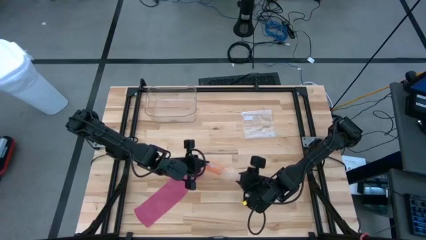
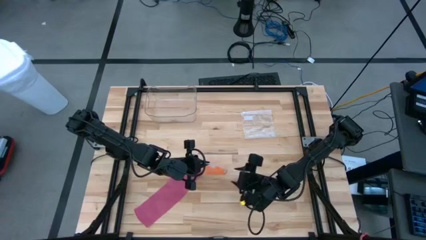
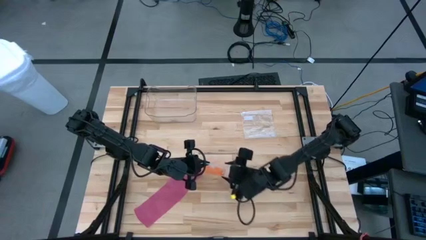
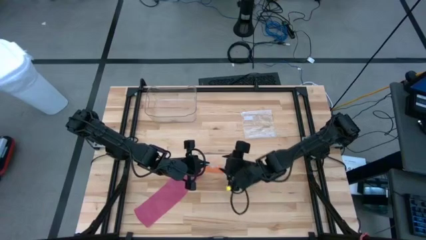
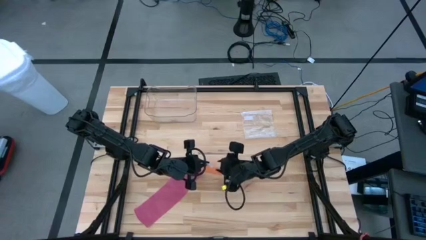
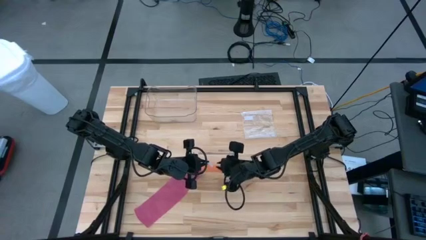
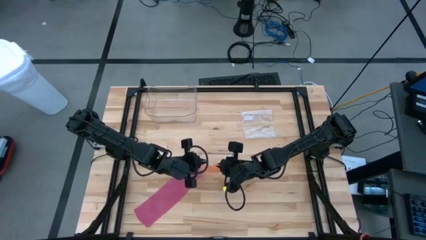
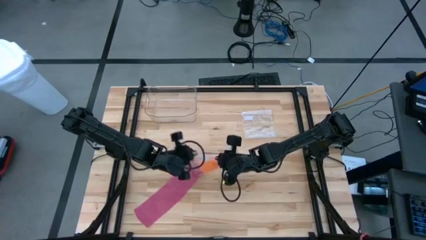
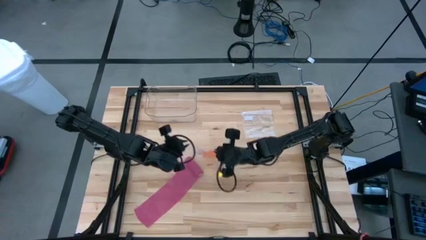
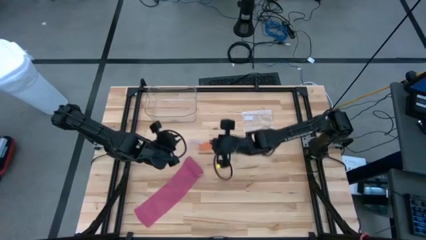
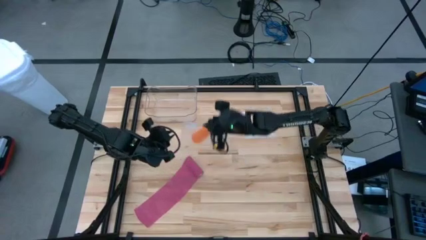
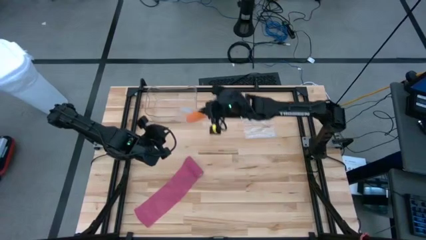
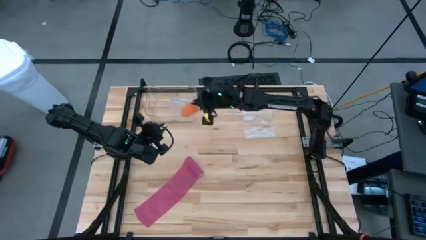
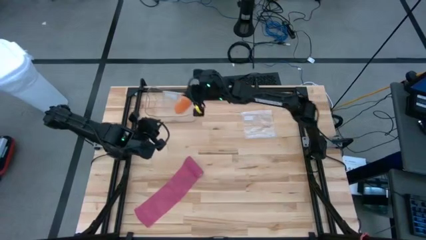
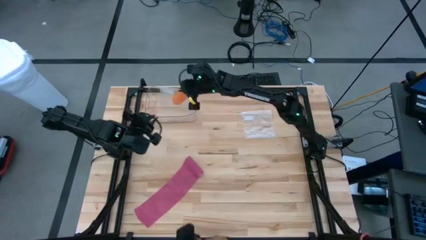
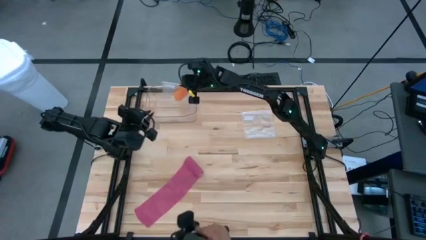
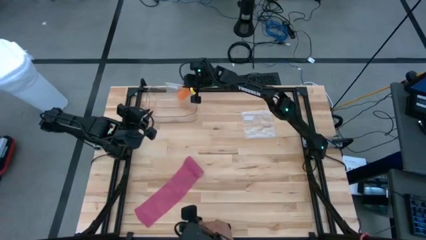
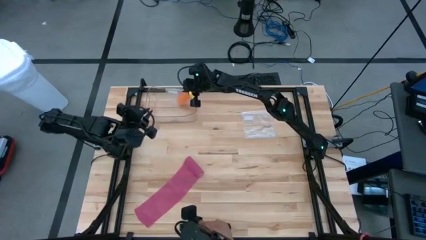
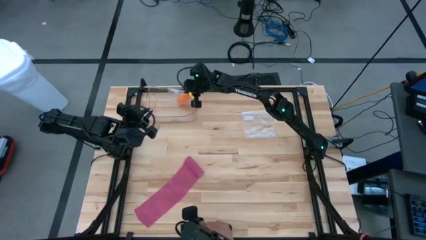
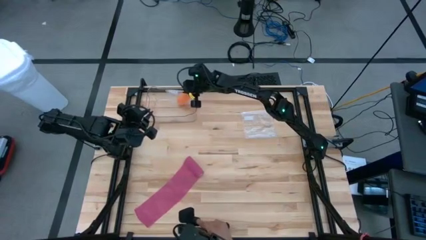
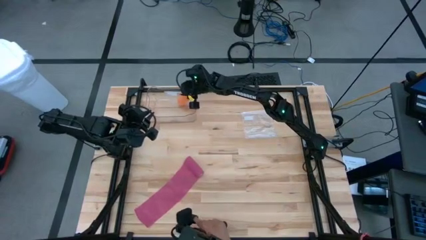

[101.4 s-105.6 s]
Task: Roll bandage
Put the packed rolled orange bandage into the transparent bin

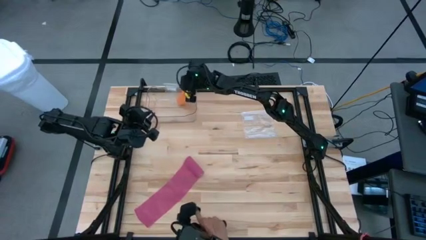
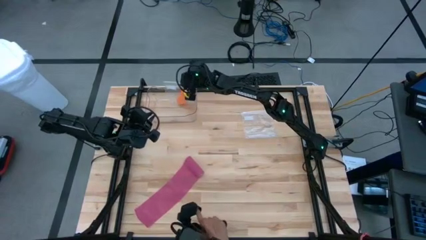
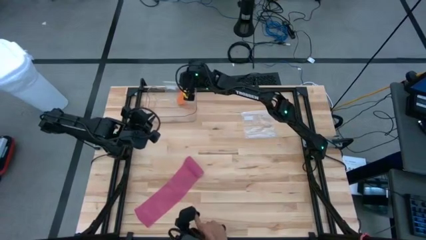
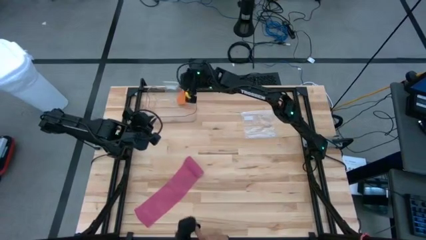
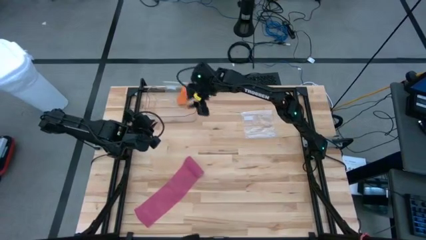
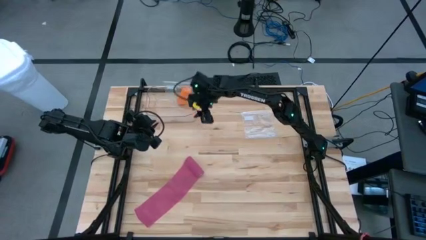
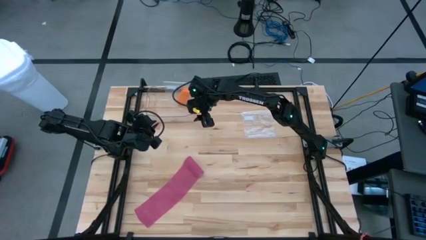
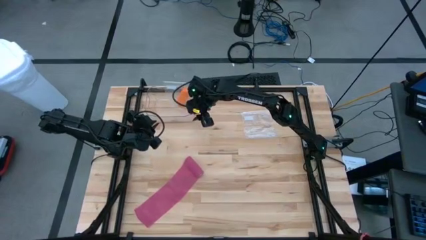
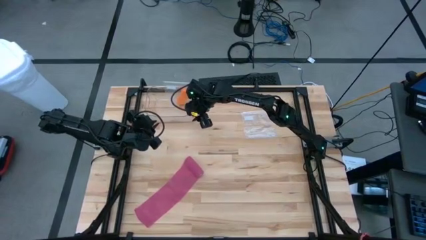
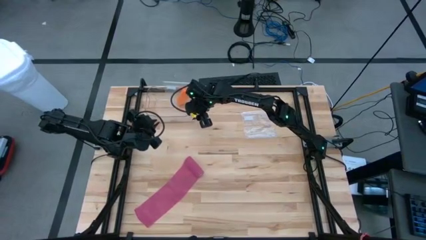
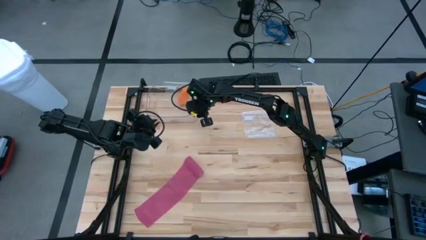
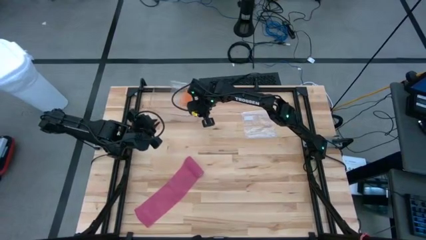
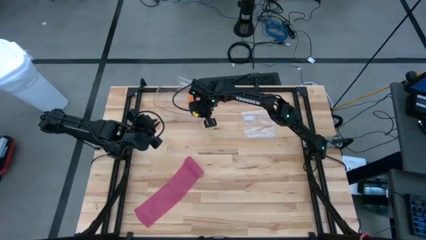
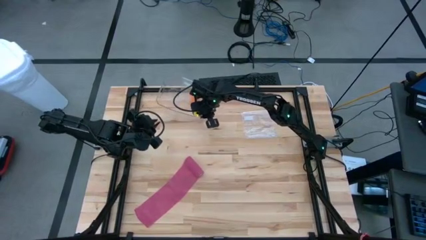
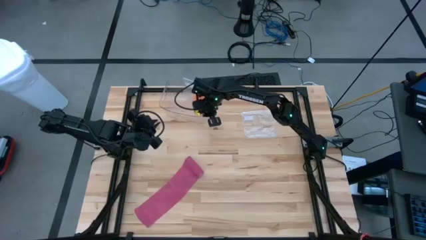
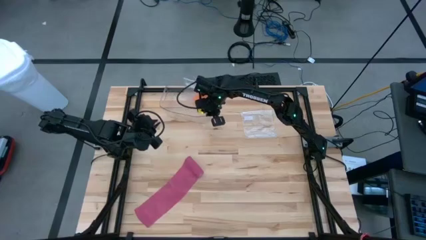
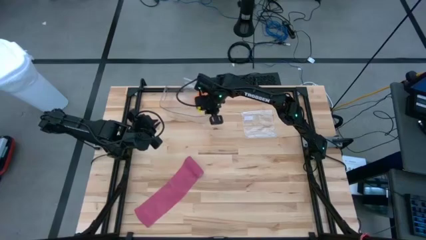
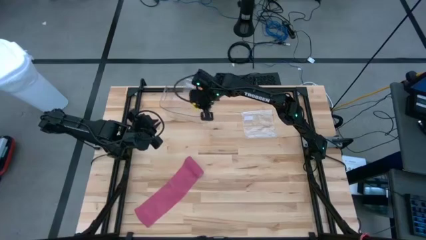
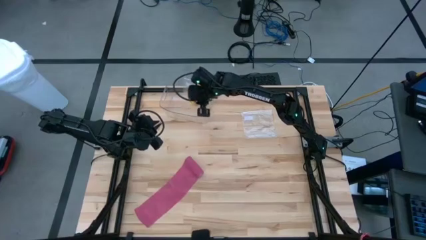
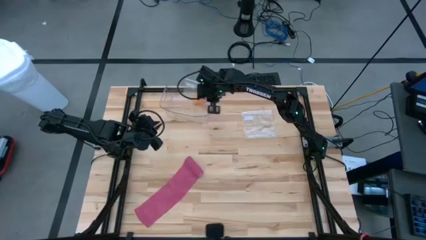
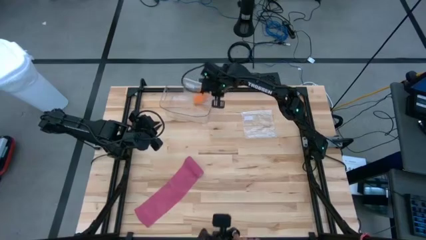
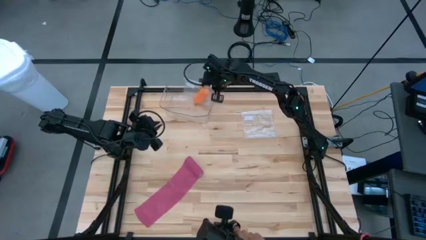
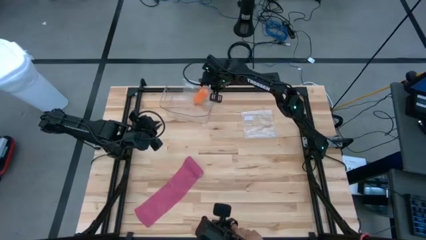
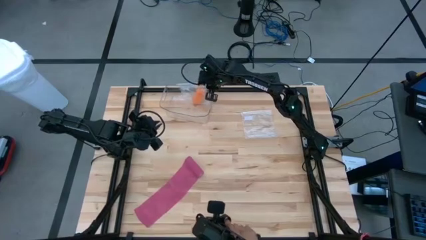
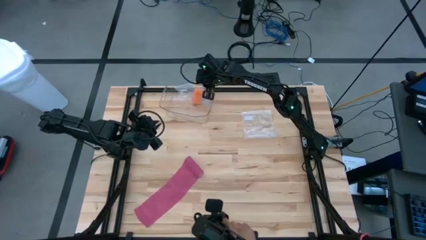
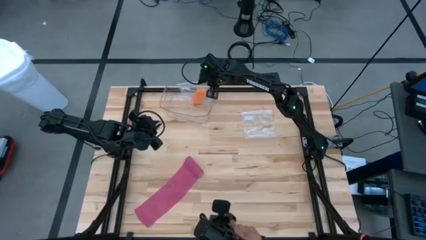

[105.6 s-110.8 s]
Adjust the transparent bin on the table
